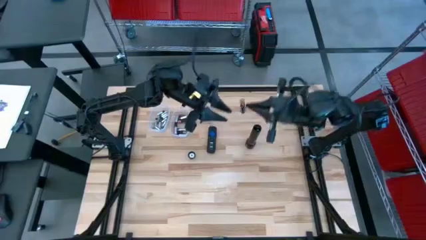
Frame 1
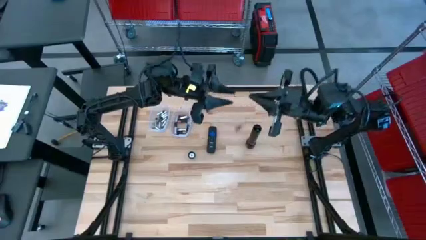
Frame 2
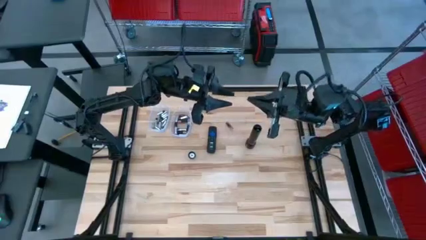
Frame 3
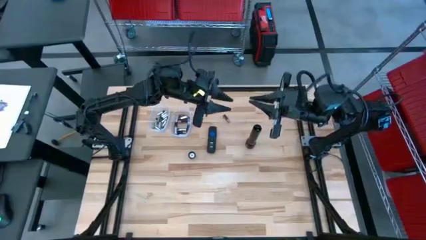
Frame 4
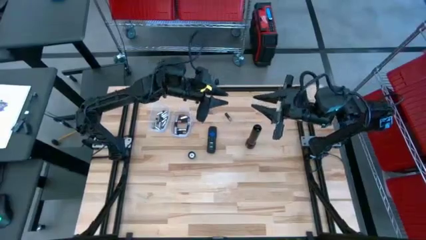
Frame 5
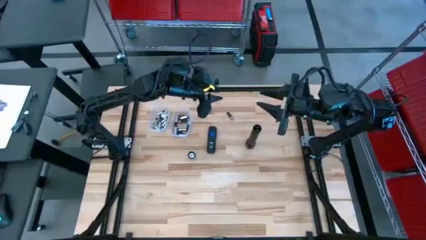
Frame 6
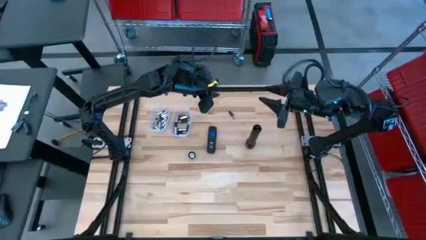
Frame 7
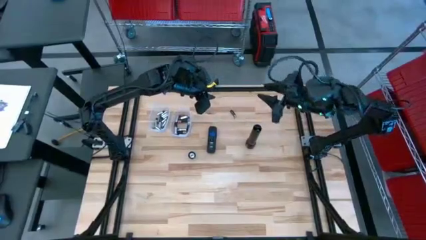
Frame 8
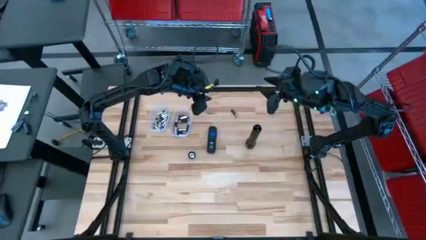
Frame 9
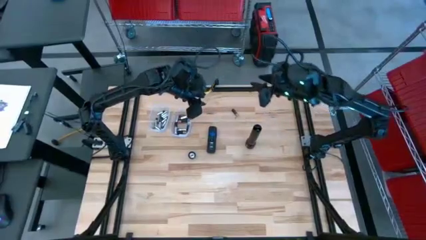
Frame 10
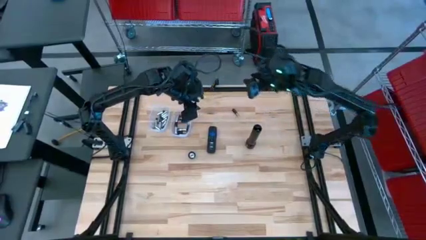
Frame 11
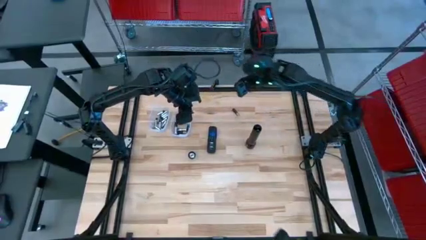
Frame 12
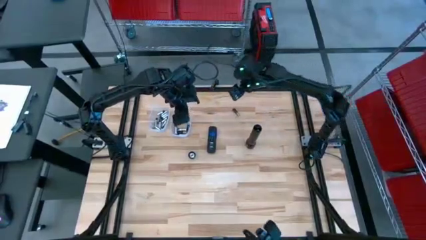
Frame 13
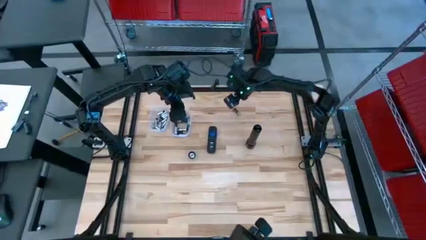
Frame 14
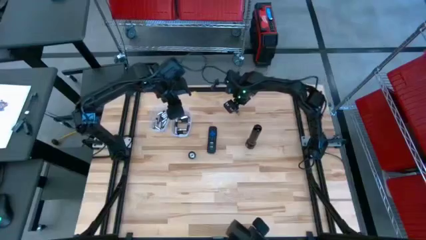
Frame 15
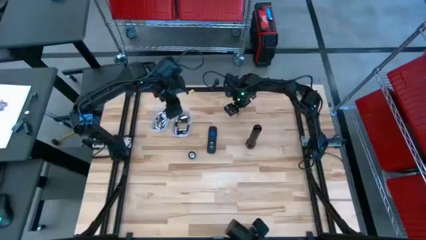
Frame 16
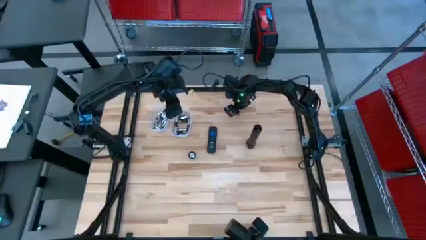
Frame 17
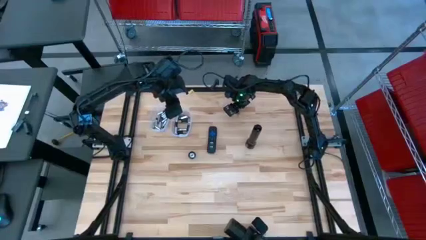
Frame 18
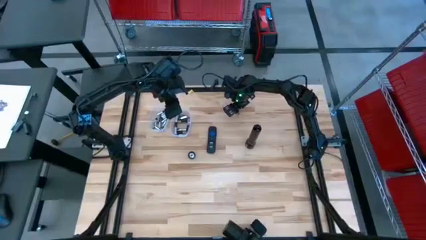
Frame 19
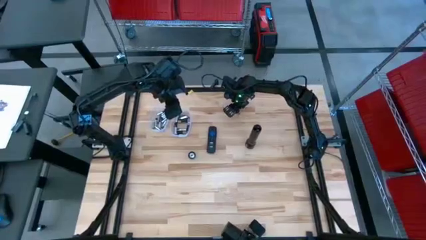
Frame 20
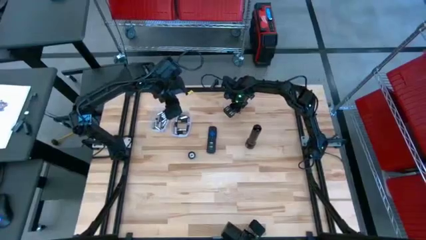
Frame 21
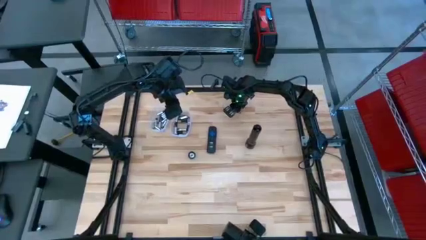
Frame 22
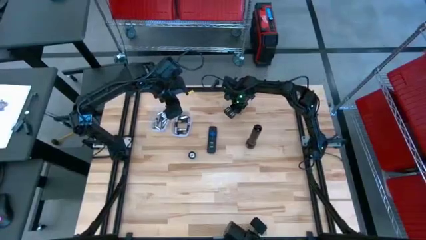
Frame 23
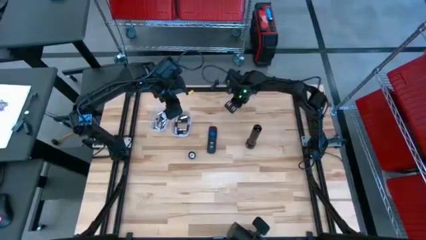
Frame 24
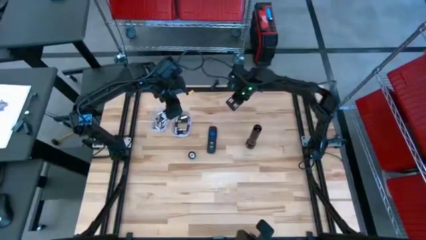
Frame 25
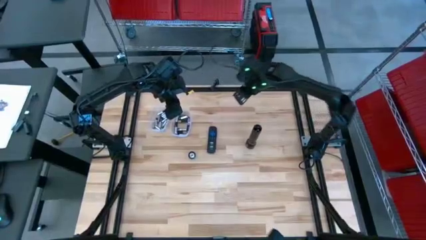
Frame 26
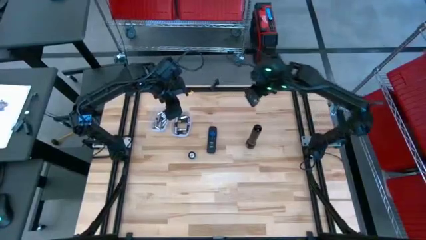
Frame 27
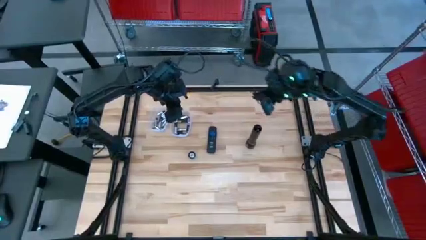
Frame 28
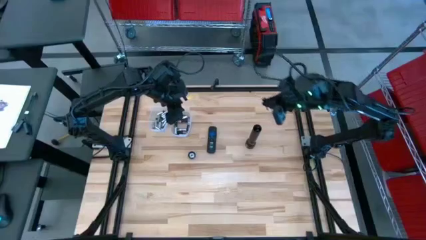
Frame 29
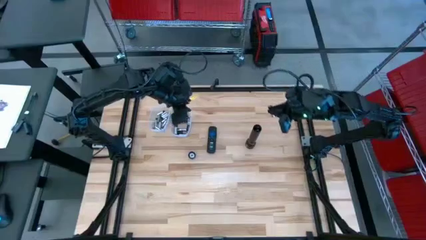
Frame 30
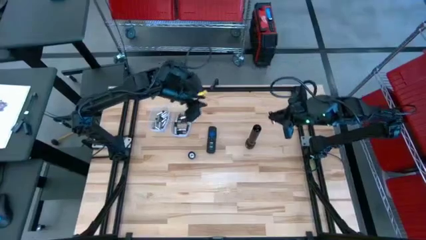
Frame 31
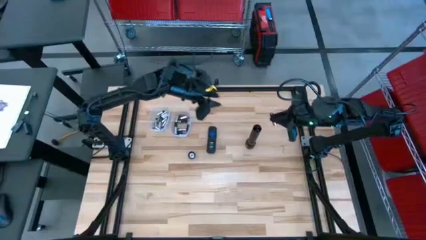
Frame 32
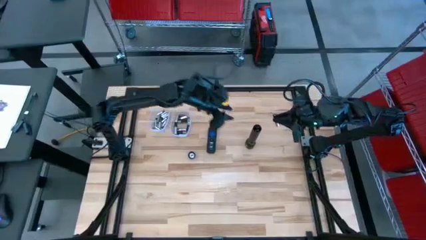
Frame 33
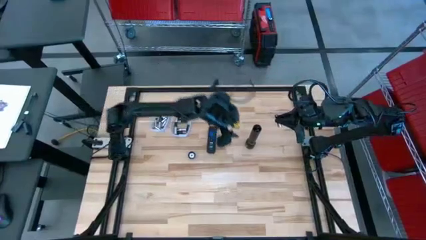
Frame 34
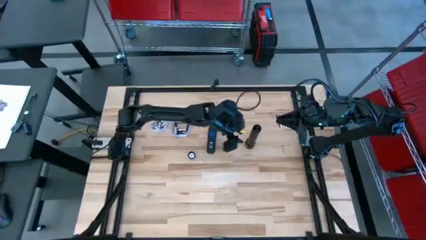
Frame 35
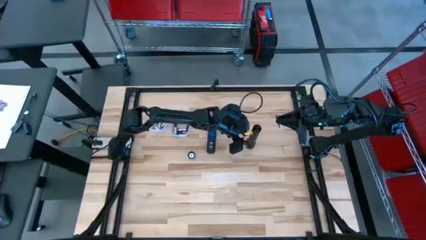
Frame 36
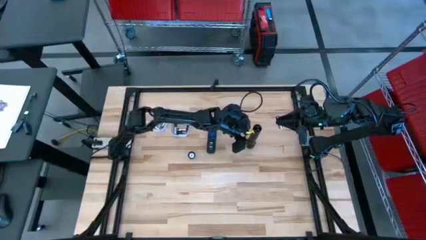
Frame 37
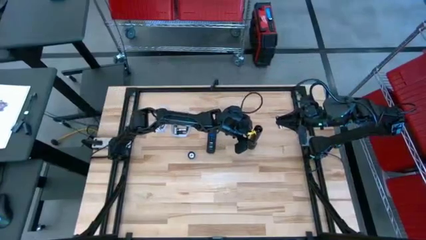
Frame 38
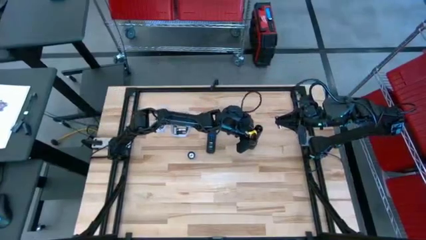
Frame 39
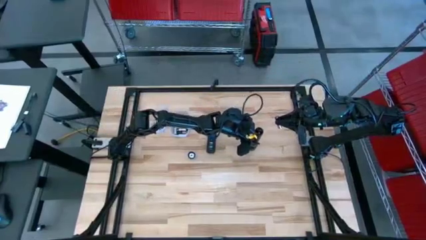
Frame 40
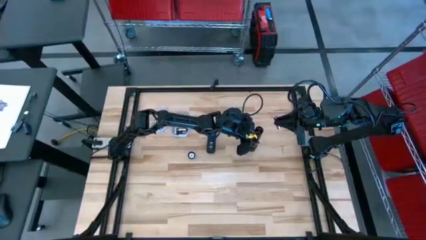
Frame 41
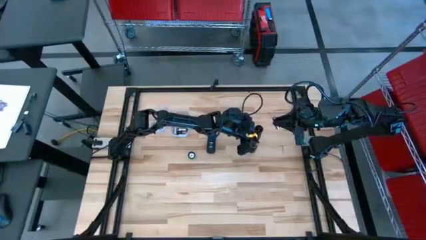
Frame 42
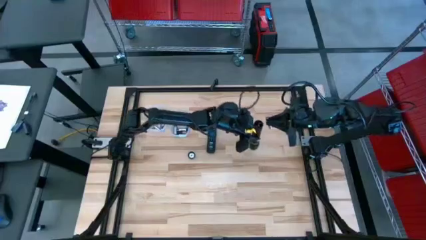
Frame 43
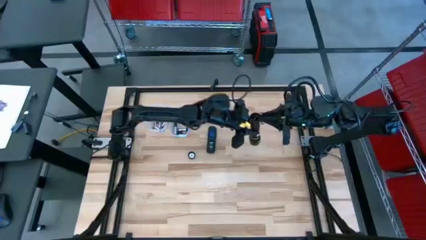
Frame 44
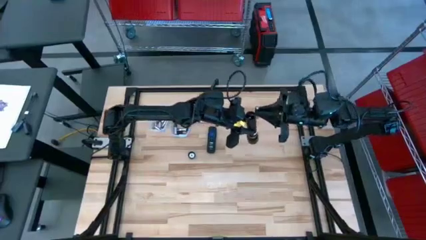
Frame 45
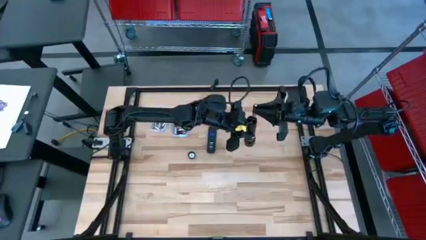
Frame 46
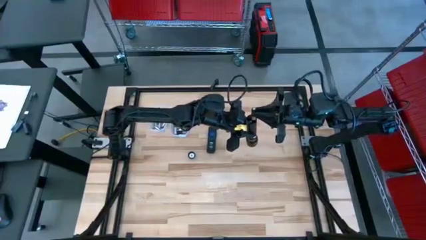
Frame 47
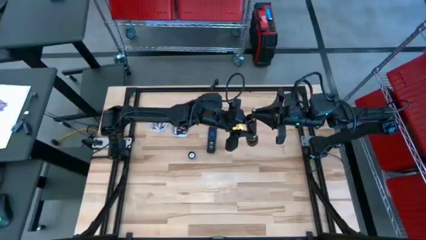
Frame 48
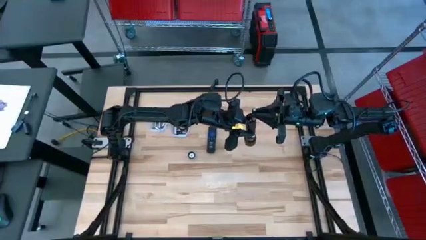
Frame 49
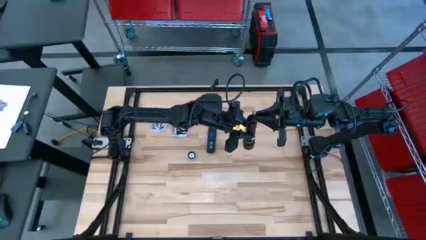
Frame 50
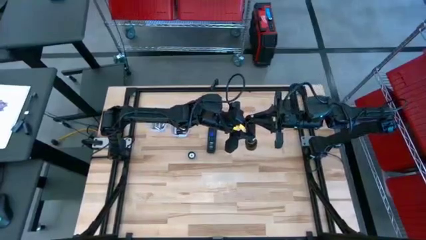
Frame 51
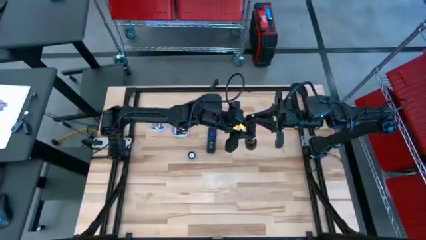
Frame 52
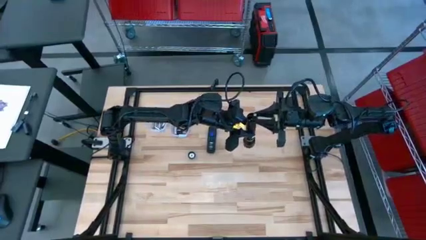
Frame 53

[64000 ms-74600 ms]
Task: Insert battery
Insert the brown battery into the flashlight battery compartment

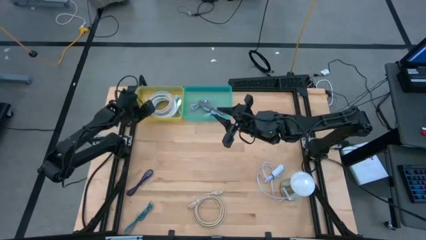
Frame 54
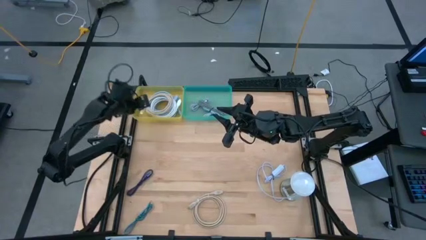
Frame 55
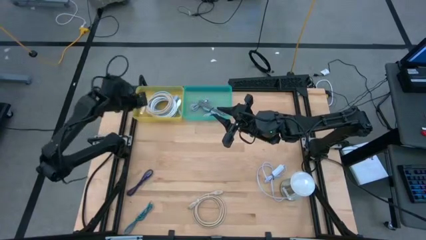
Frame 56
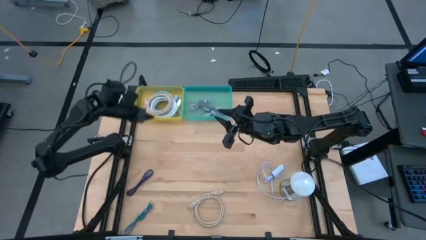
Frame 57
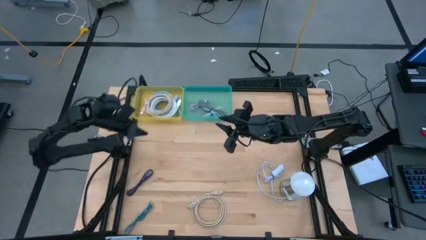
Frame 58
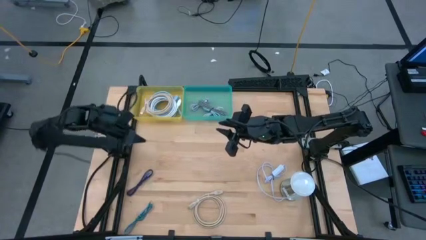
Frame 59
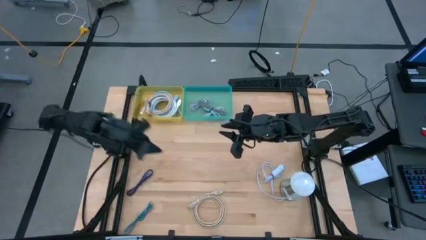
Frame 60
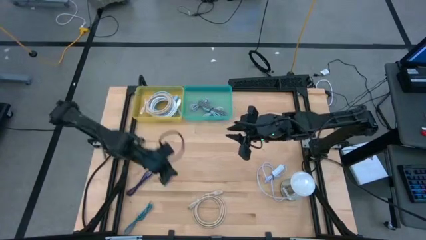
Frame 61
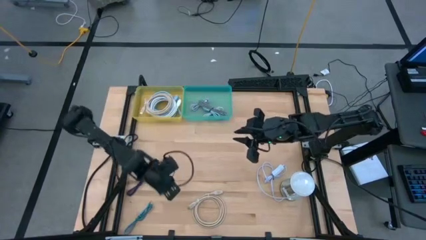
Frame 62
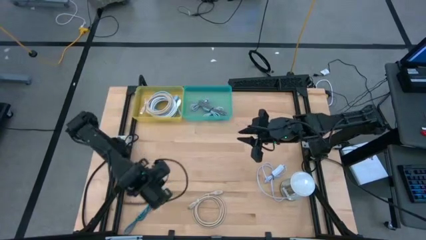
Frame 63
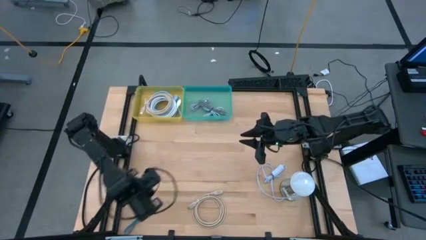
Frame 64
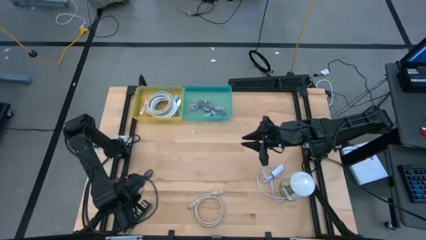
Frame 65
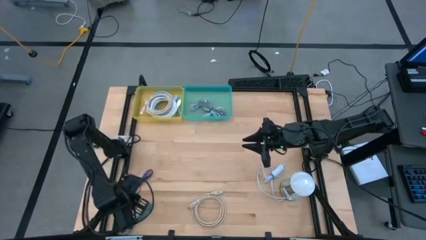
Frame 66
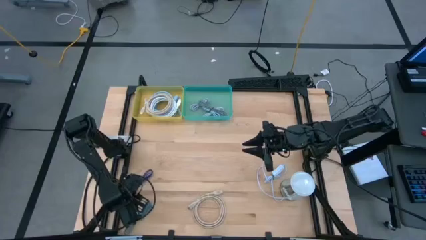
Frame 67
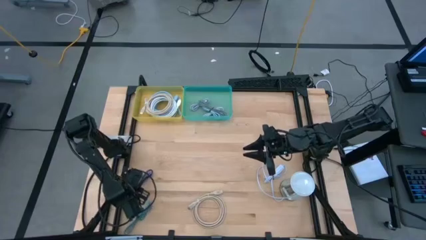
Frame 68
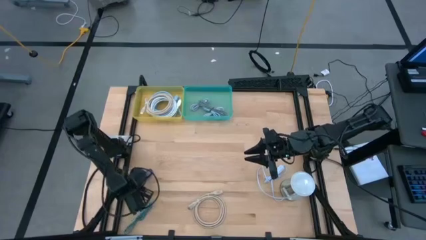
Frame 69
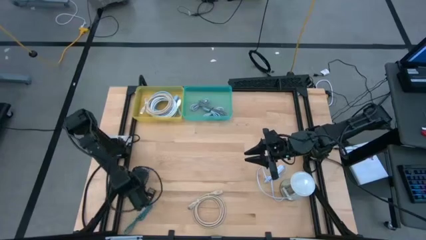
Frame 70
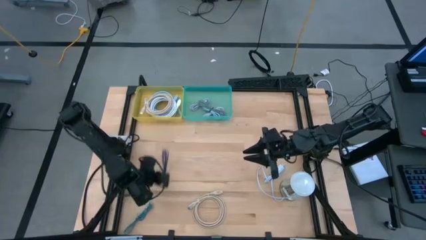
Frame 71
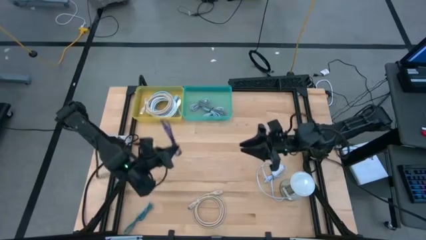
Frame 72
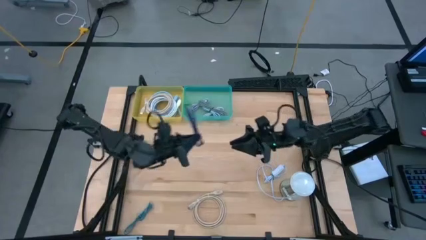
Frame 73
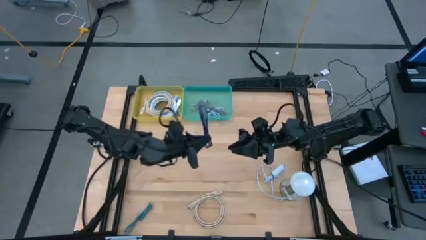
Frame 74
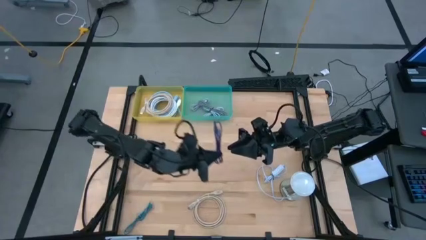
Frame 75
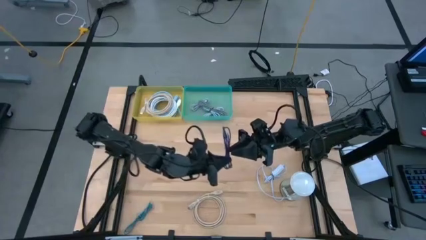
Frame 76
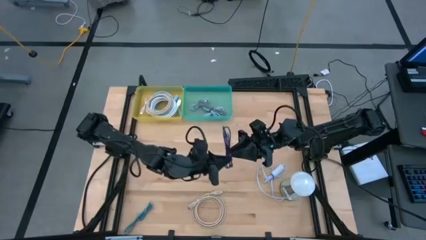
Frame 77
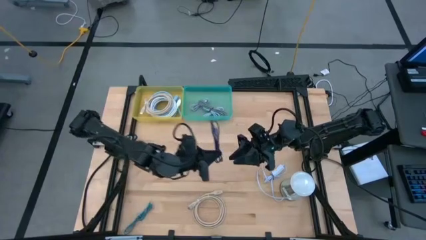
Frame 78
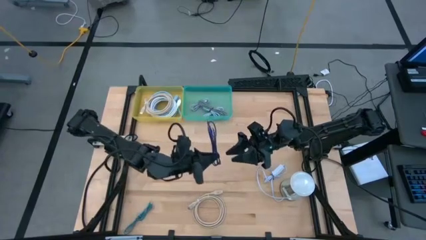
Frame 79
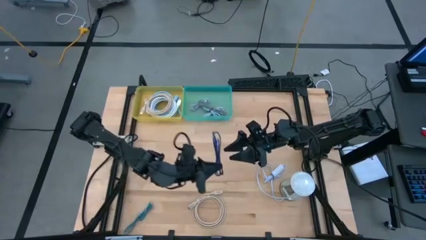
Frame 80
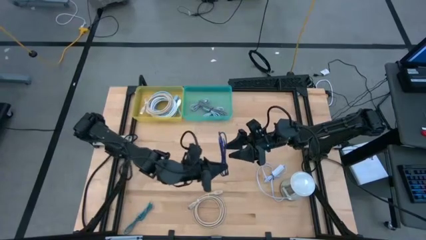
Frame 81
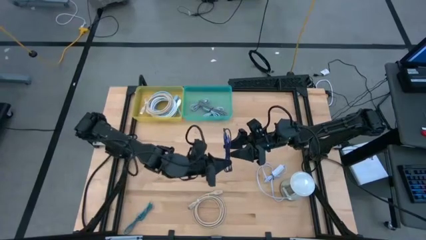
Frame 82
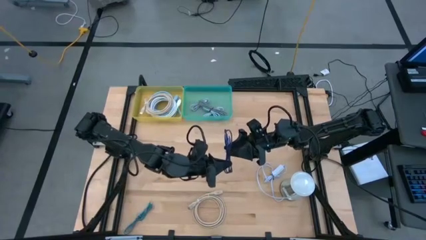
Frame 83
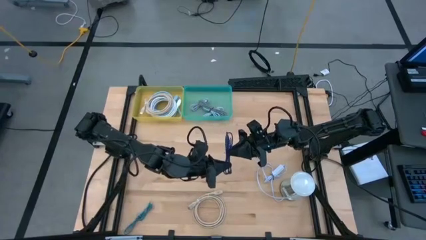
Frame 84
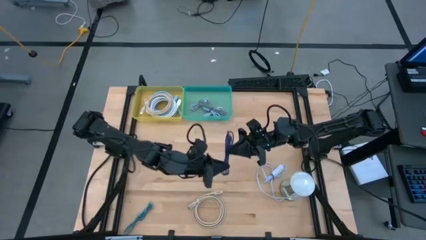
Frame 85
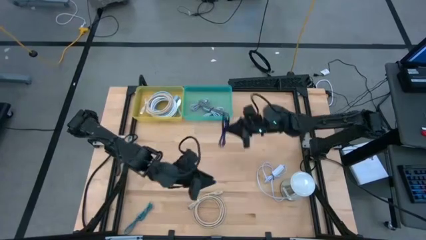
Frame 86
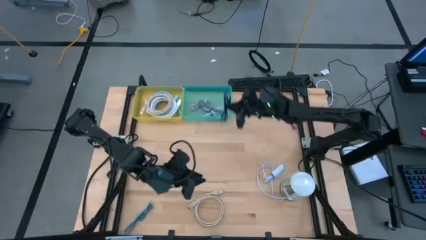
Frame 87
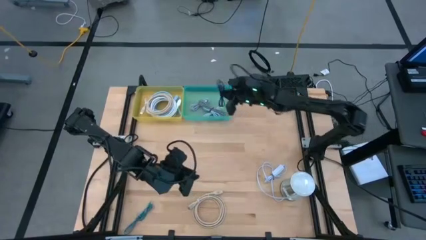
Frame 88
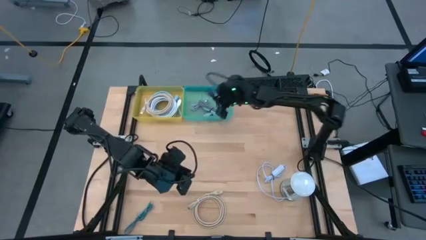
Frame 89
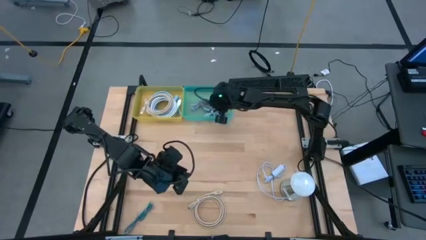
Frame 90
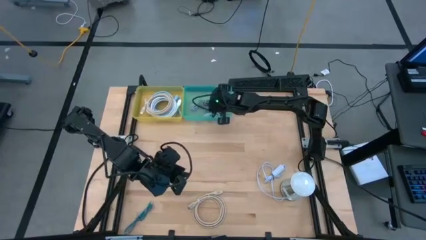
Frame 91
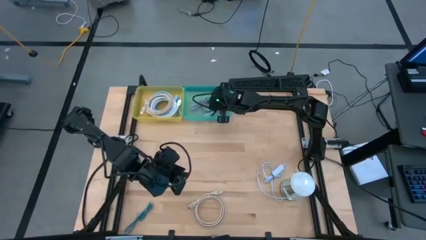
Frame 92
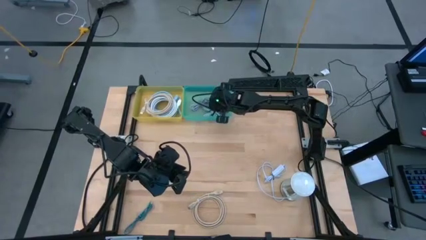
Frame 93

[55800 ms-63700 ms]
Task: Pick & Place USB Port
Put the purple charger cable into the green bin
